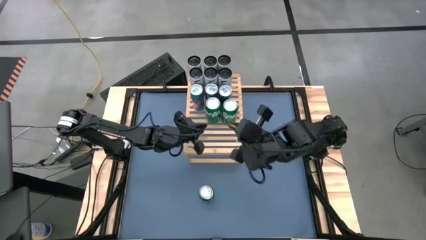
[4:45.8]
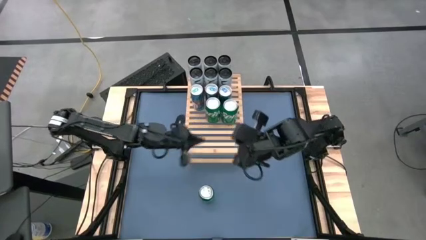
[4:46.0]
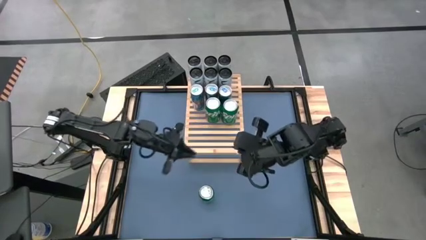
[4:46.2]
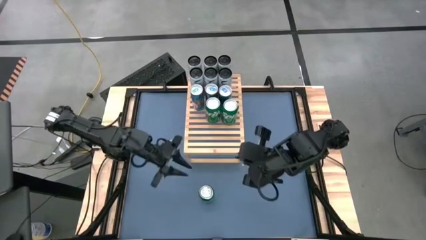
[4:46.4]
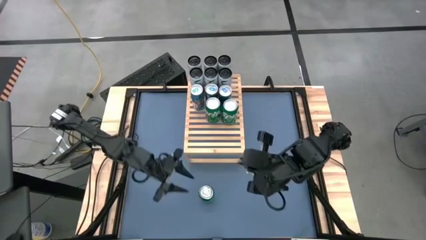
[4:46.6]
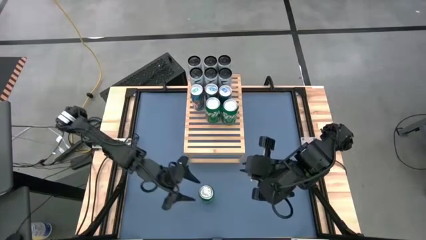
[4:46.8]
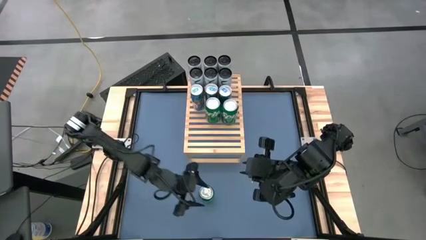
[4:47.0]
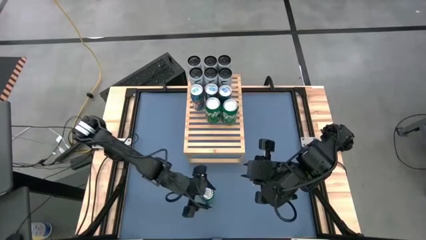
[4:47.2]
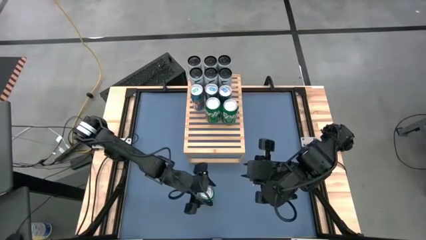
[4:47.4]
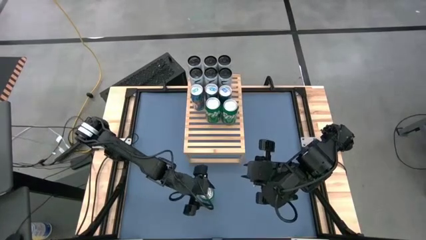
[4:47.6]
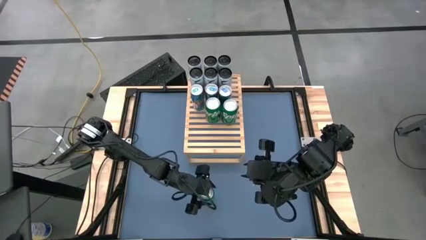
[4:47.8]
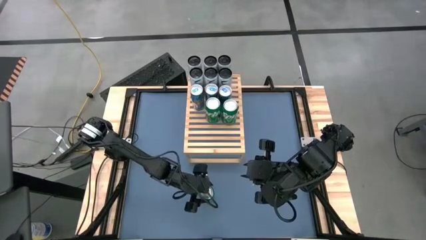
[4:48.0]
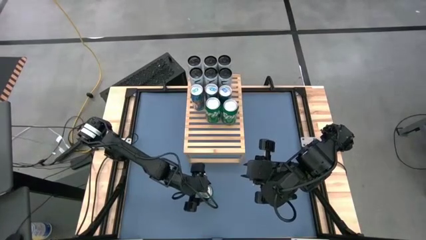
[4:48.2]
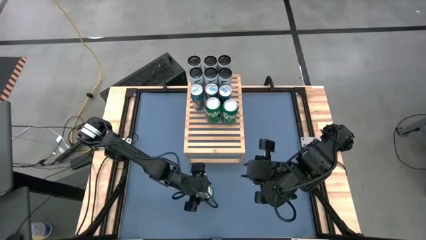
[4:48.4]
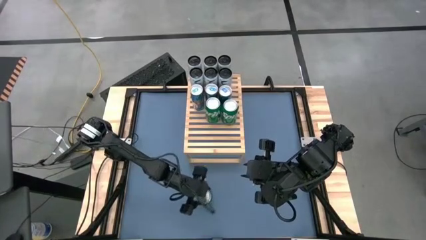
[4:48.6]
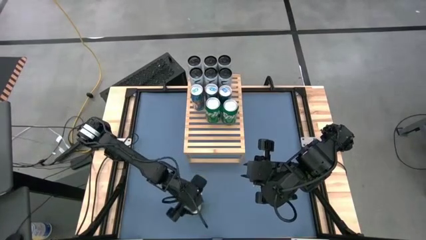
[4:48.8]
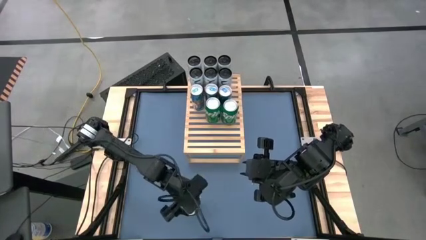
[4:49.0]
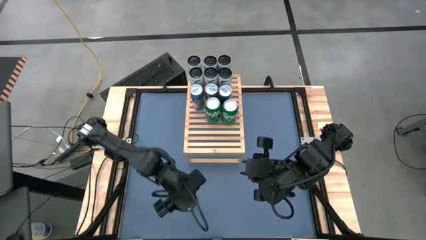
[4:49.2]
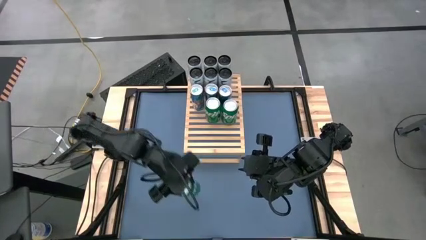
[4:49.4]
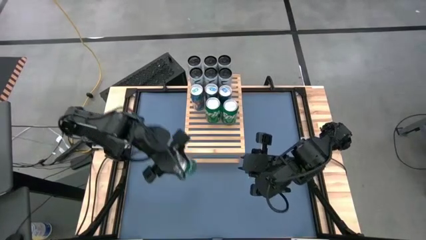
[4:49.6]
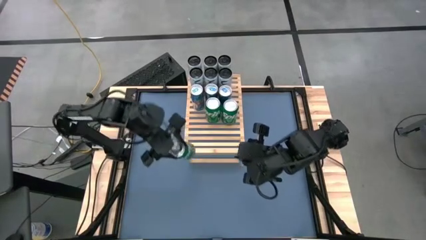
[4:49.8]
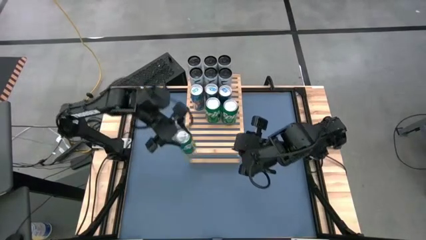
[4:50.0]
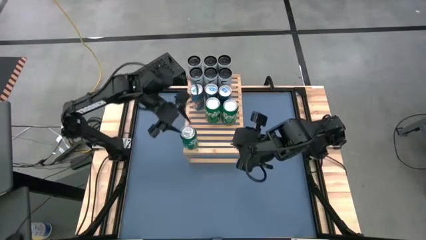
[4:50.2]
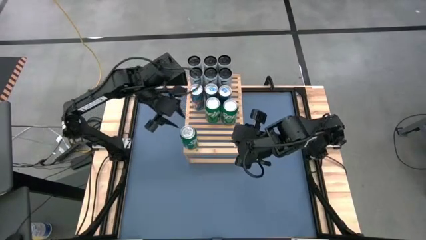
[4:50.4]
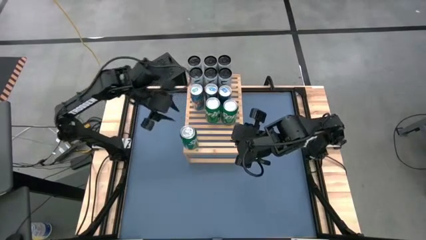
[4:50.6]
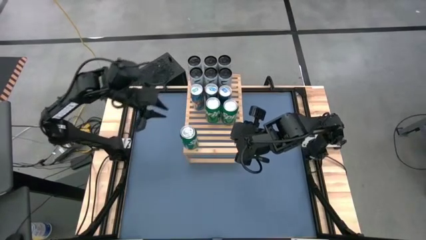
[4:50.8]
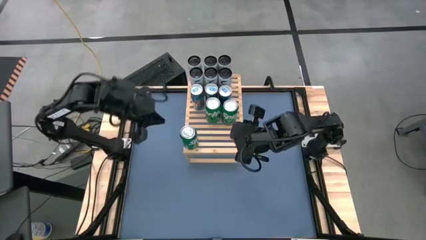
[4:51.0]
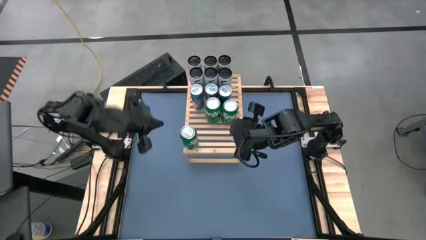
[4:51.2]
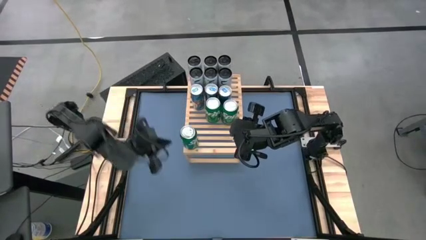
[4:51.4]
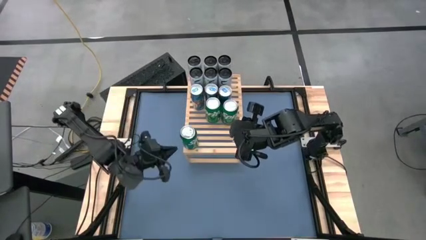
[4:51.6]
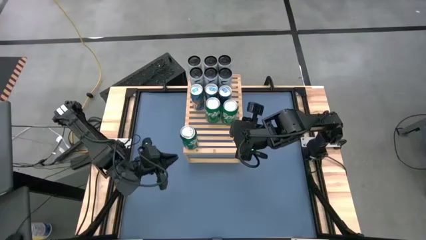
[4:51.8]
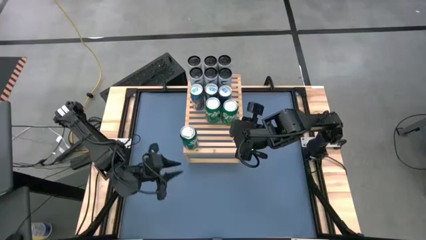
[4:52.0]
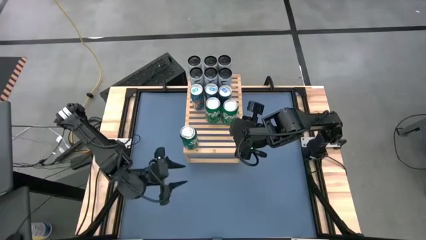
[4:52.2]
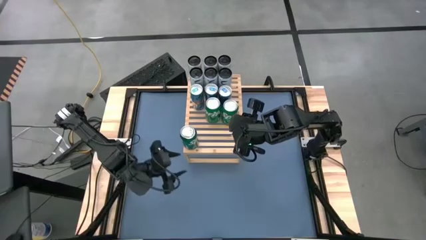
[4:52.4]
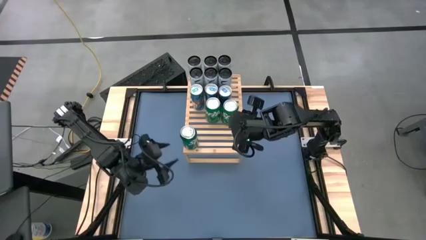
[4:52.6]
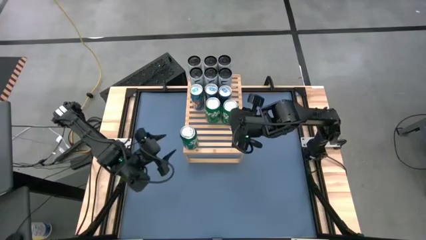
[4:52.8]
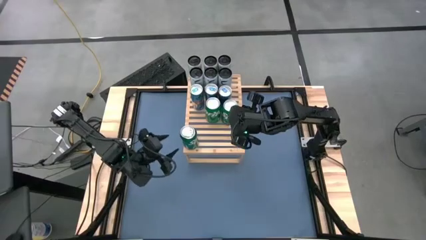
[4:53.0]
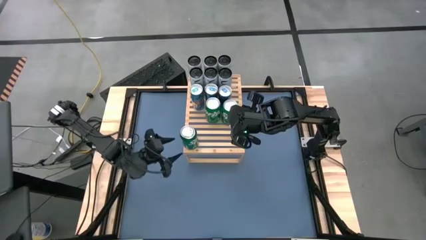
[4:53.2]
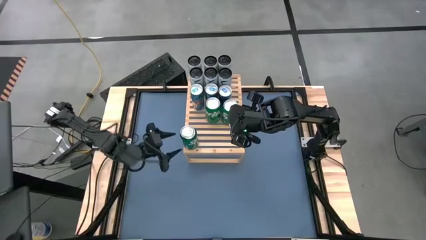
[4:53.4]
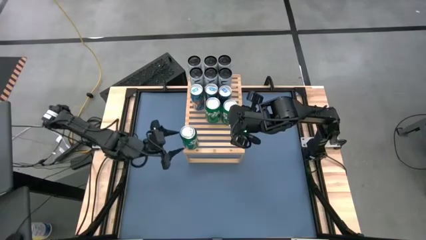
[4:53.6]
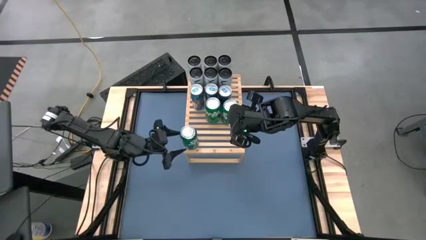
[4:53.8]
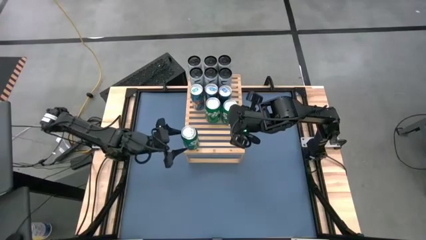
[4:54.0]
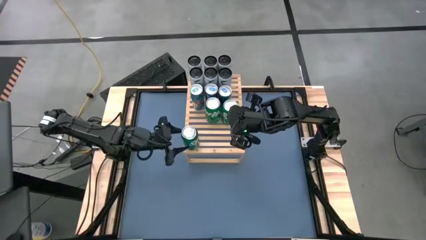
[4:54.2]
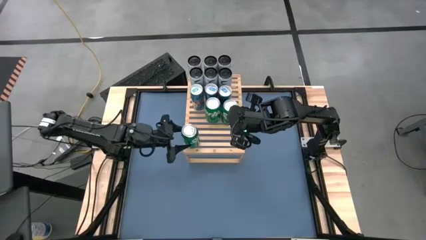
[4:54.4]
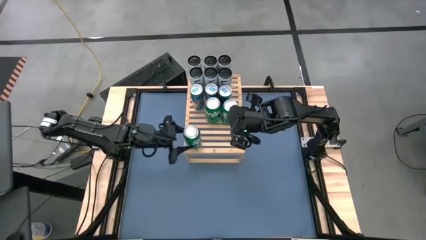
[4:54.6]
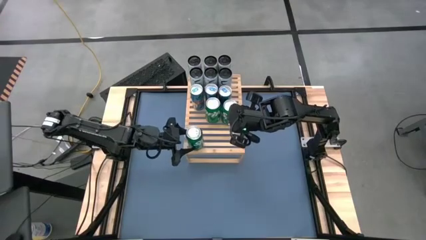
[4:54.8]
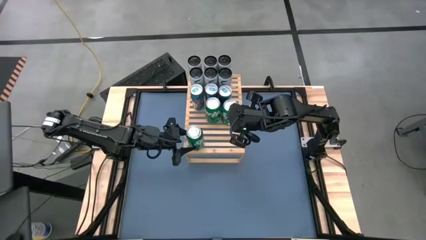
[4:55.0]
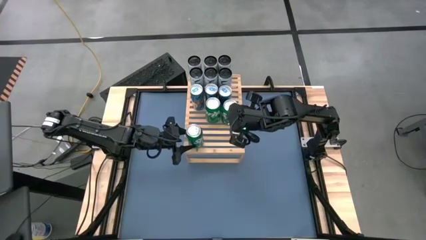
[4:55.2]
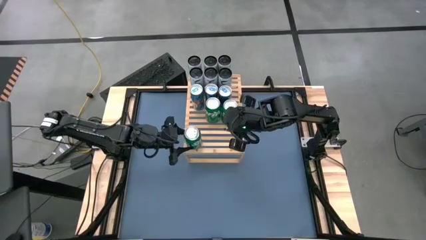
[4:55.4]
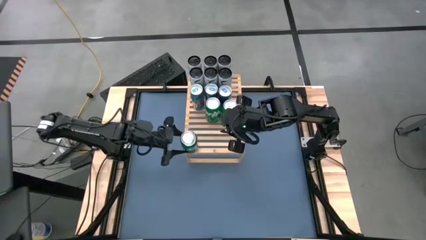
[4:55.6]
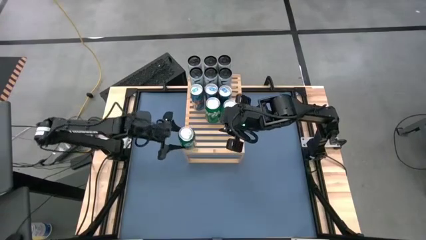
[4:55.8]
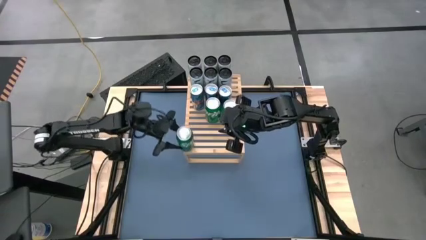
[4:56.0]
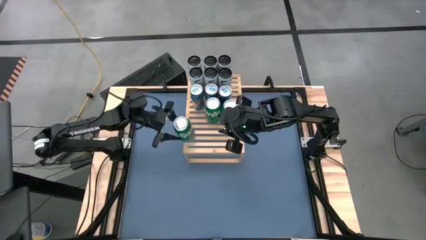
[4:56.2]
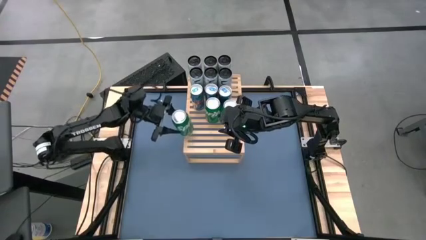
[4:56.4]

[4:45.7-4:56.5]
Task: Place canned beverage on shelf
Put the green soda can on the shelf aligned to the other green soda can
